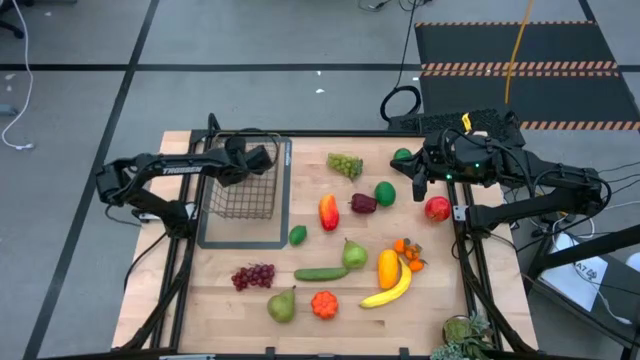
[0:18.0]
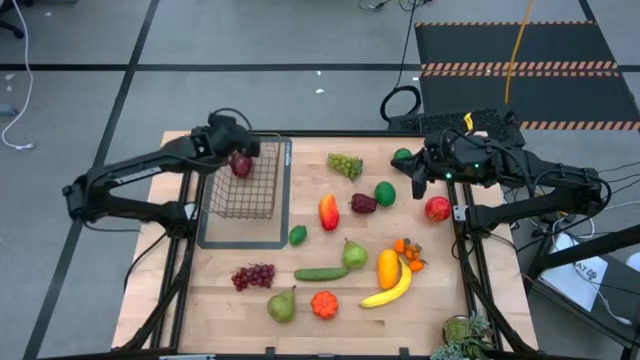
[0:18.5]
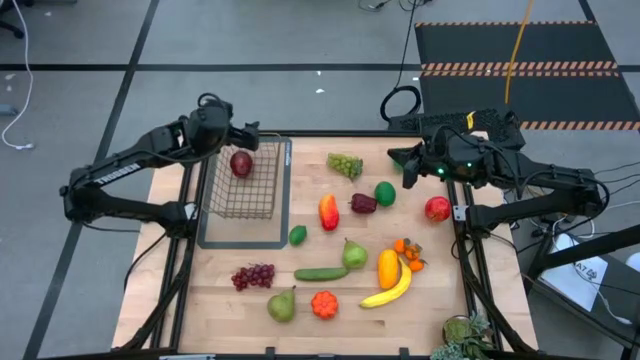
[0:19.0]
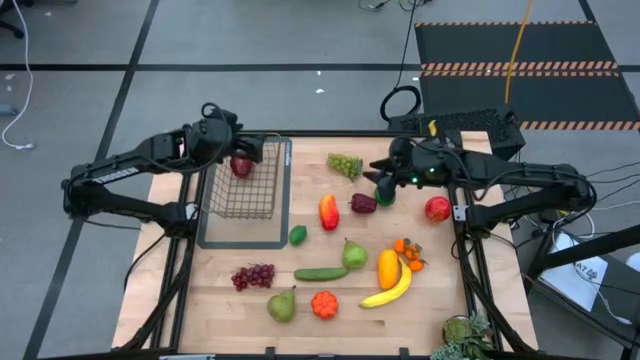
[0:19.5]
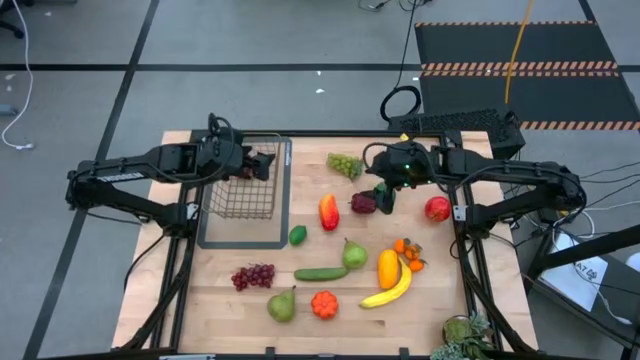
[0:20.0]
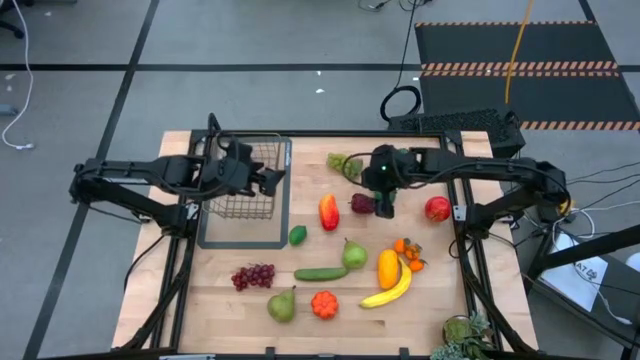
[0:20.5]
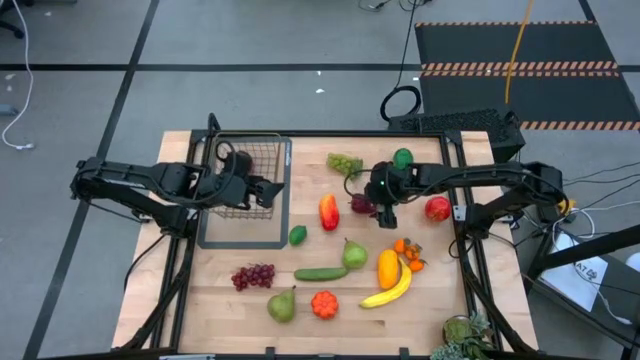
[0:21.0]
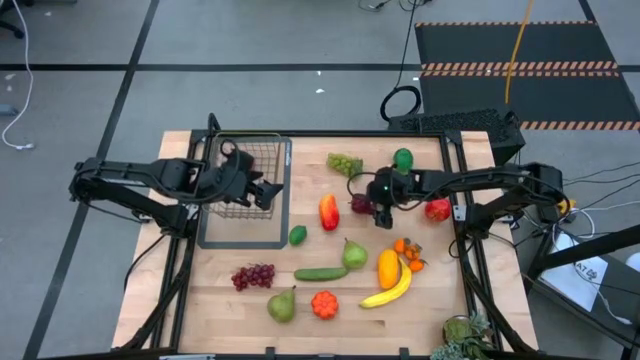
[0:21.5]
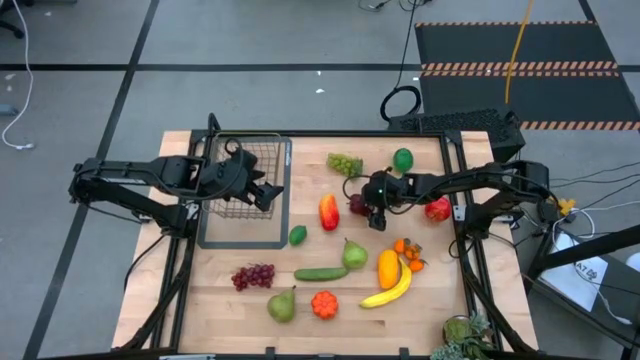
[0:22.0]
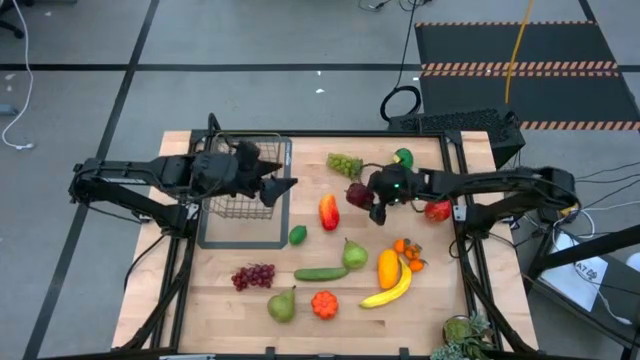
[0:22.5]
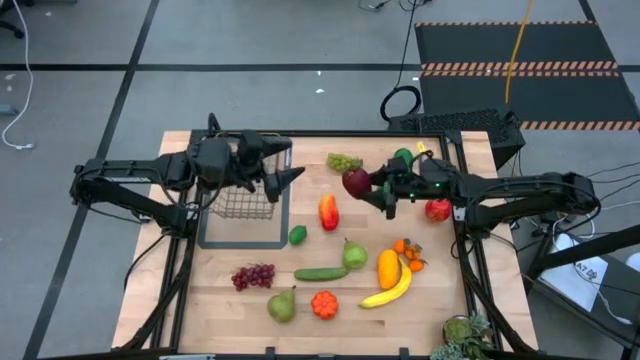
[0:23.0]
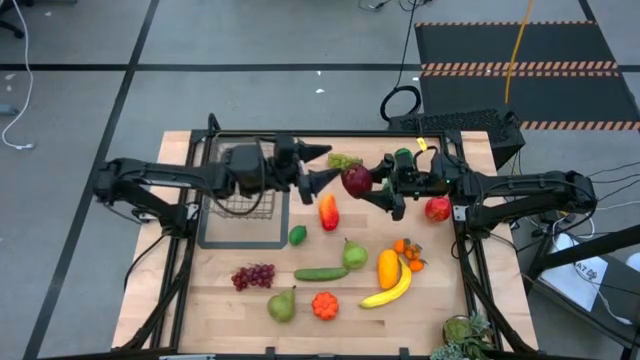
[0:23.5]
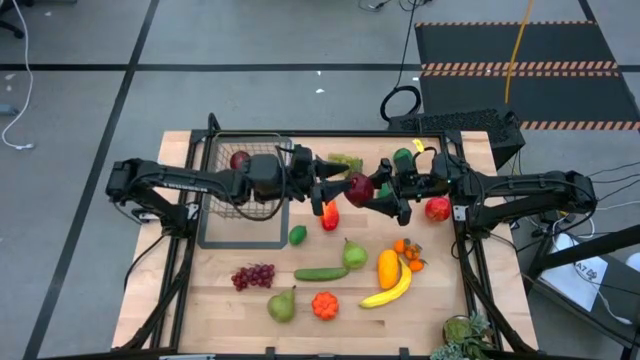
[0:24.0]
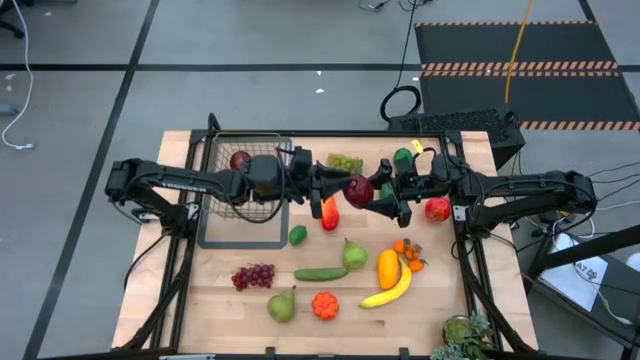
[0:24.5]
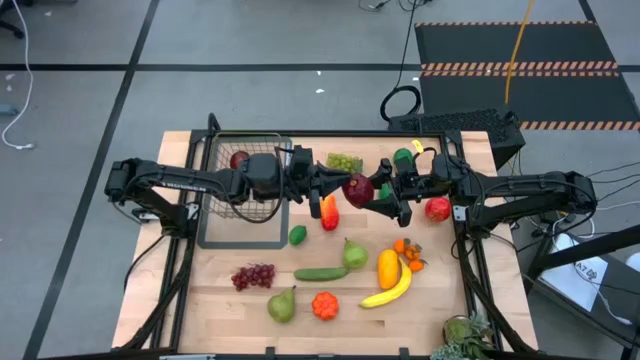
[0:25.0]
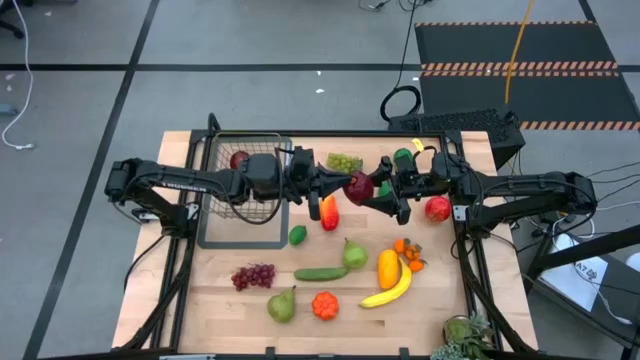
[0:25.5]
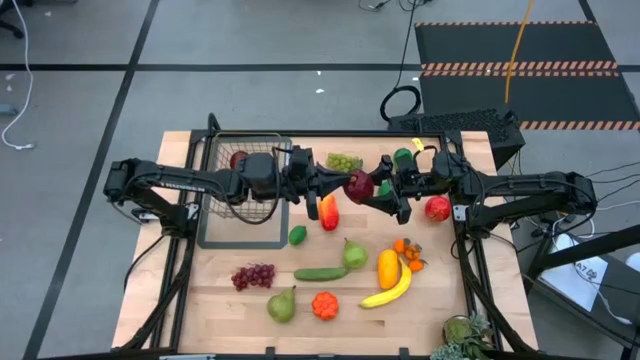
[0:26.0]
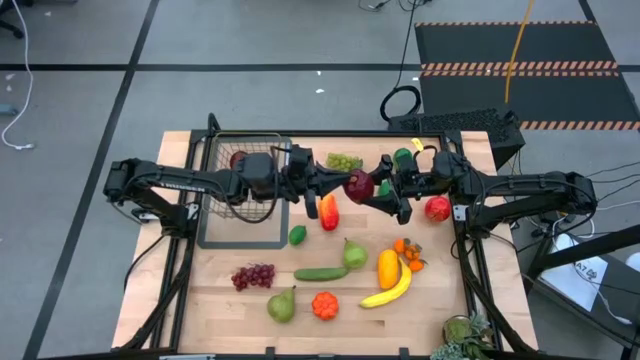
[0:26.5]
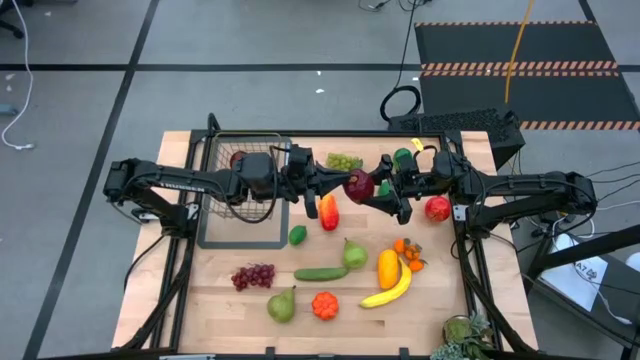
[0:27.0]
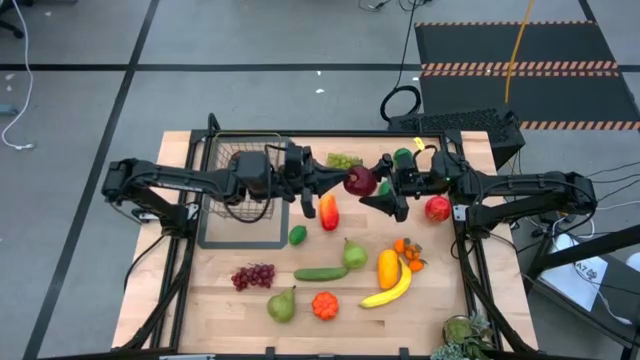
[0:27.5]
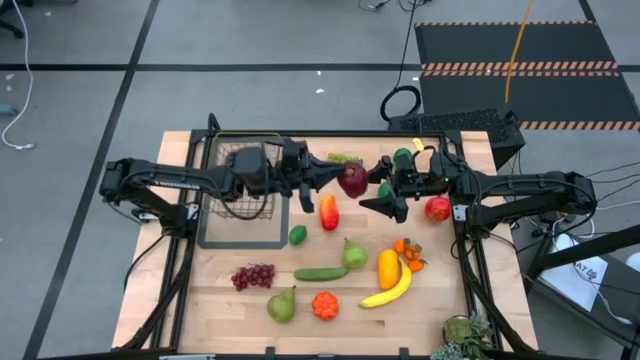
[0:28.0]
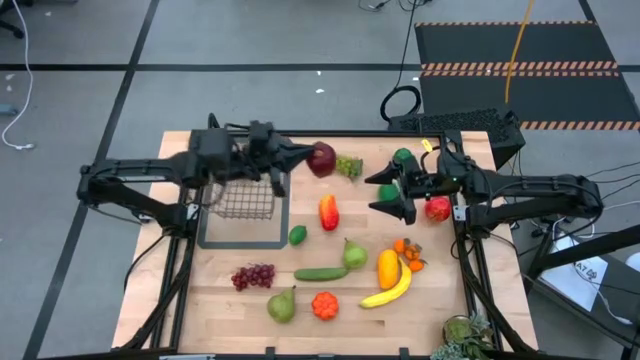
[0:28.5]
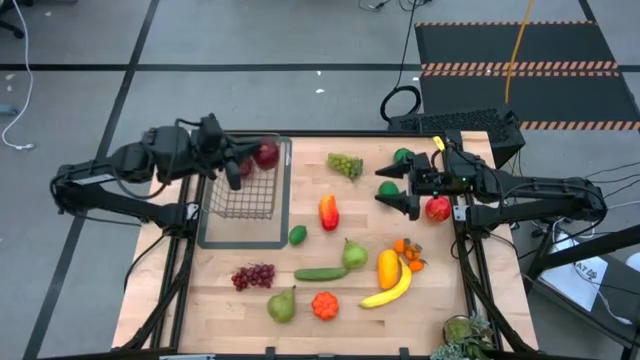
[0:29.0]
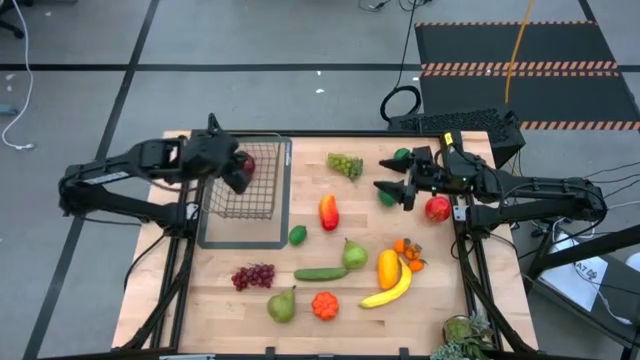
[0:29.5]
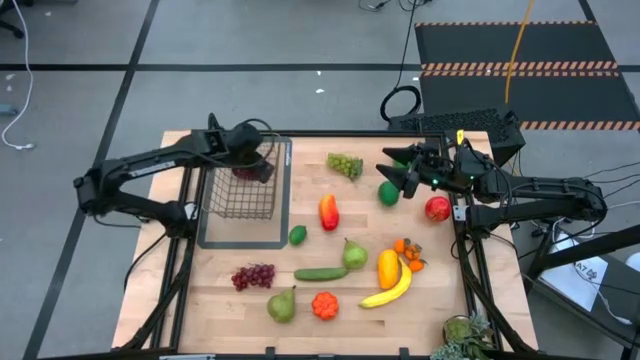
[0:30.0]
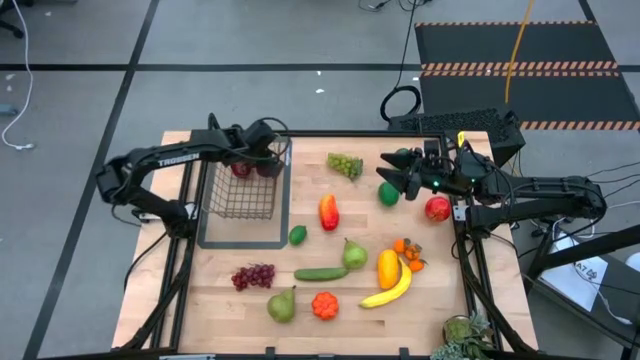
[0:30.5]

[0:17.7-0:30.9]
Task: Build produce basket
Put the left apple into the wire basket
